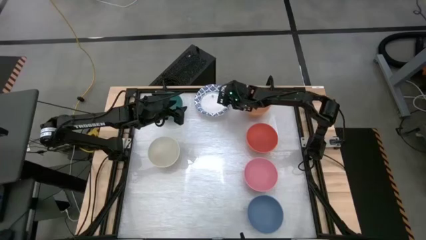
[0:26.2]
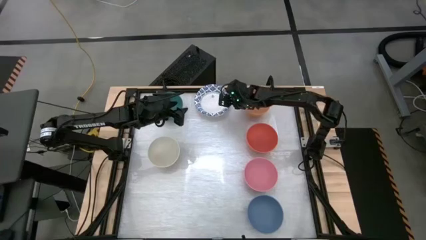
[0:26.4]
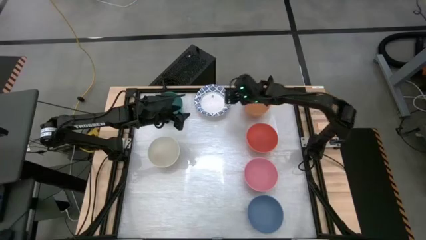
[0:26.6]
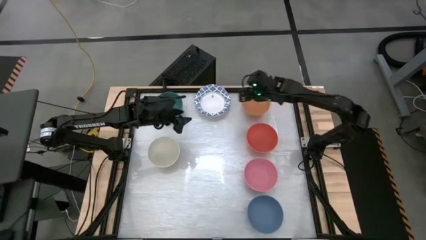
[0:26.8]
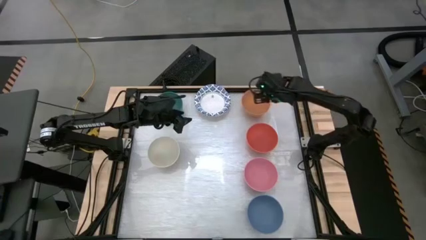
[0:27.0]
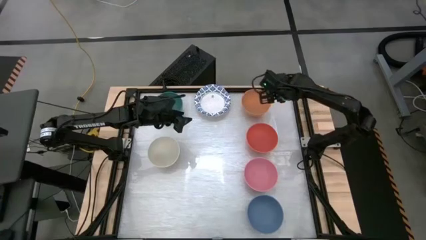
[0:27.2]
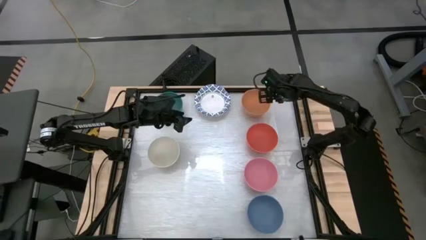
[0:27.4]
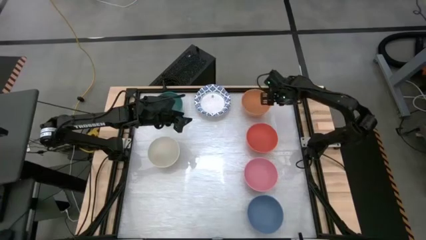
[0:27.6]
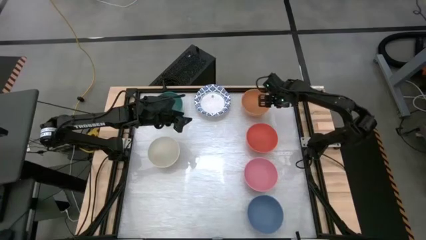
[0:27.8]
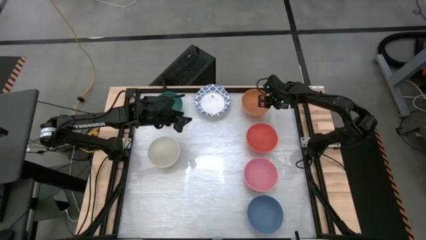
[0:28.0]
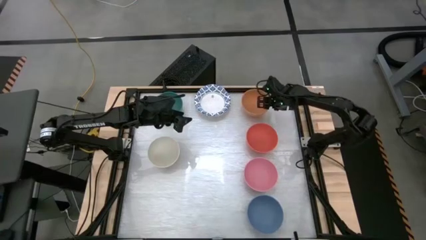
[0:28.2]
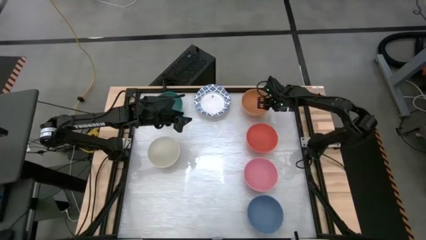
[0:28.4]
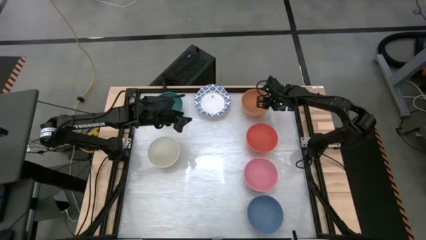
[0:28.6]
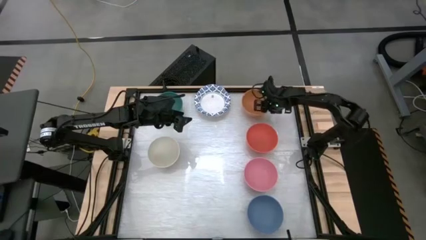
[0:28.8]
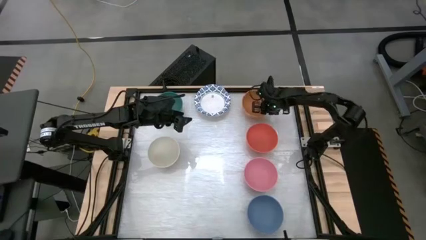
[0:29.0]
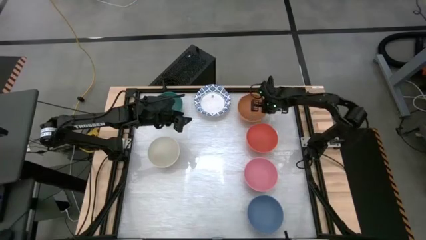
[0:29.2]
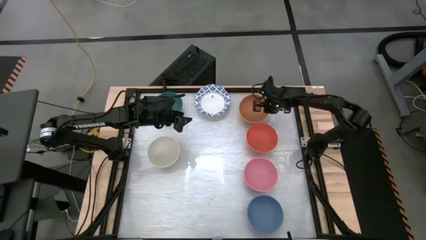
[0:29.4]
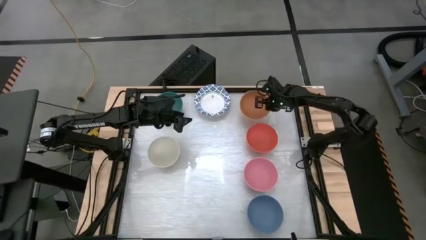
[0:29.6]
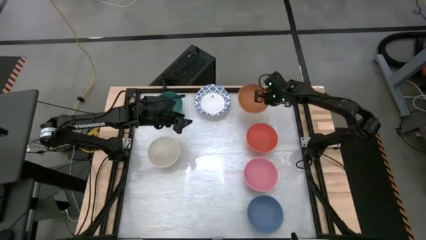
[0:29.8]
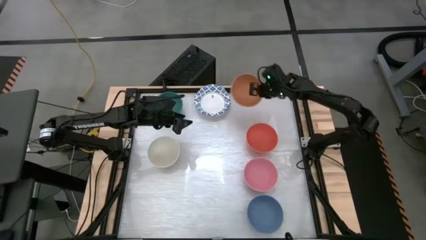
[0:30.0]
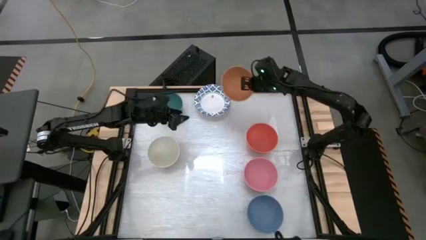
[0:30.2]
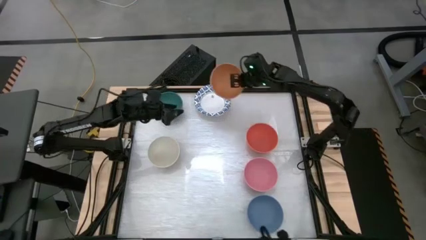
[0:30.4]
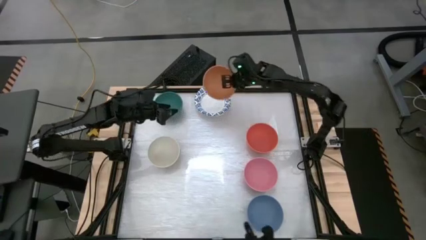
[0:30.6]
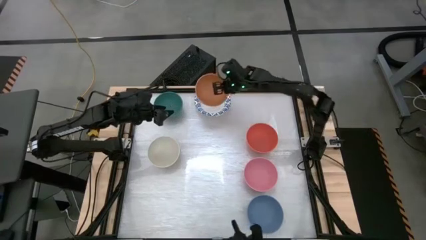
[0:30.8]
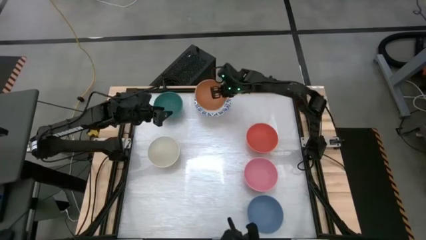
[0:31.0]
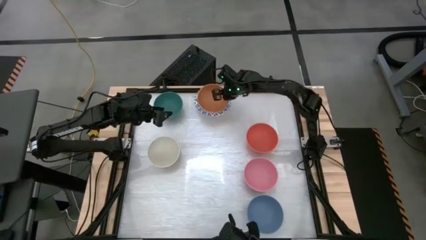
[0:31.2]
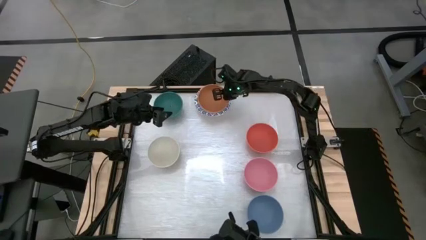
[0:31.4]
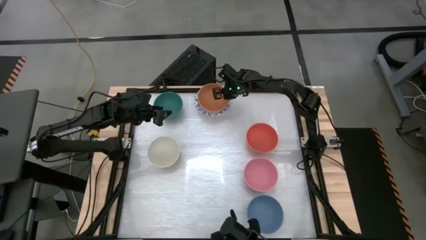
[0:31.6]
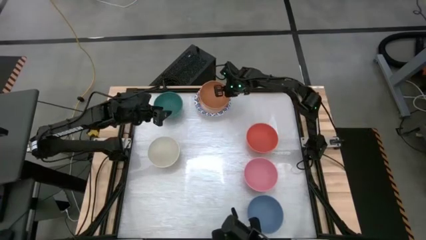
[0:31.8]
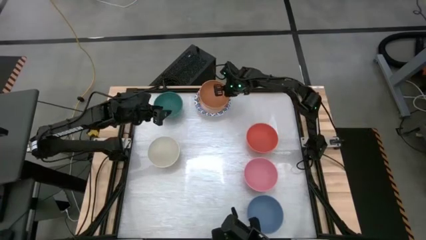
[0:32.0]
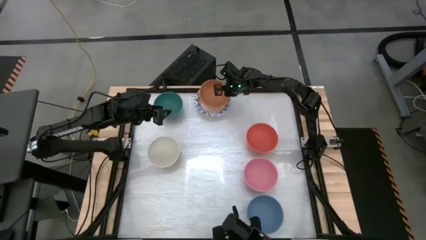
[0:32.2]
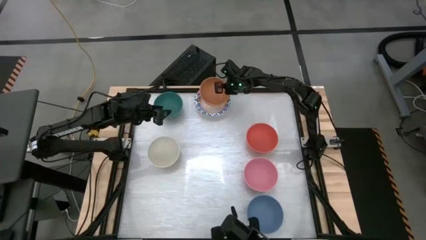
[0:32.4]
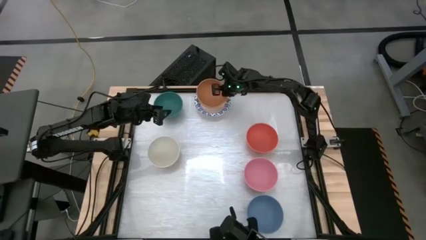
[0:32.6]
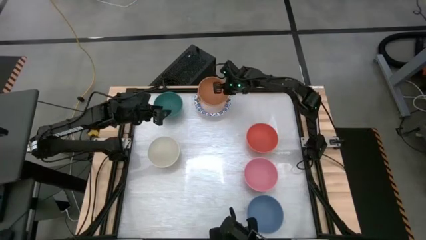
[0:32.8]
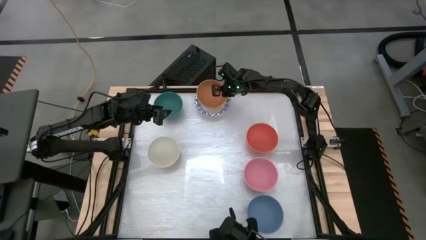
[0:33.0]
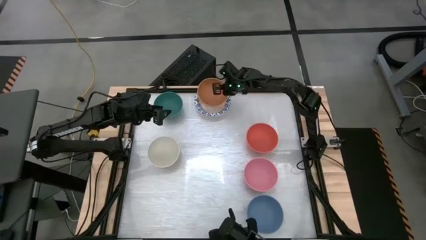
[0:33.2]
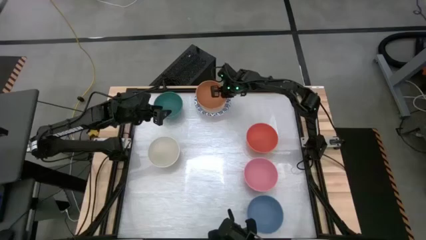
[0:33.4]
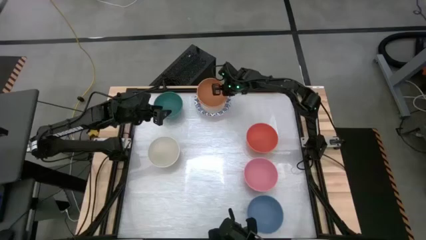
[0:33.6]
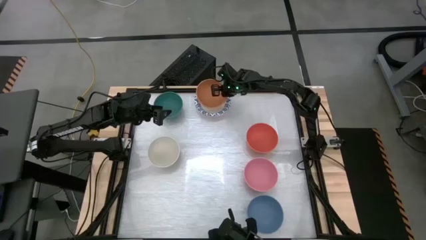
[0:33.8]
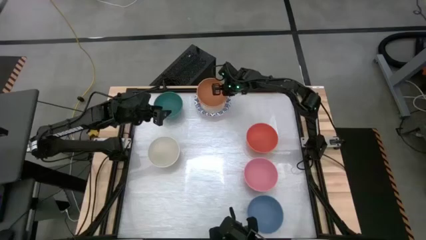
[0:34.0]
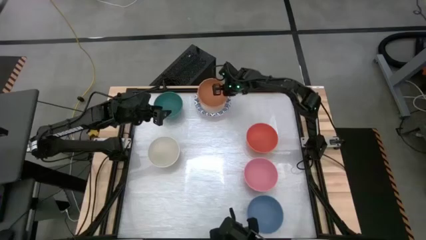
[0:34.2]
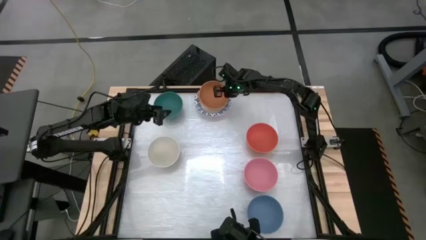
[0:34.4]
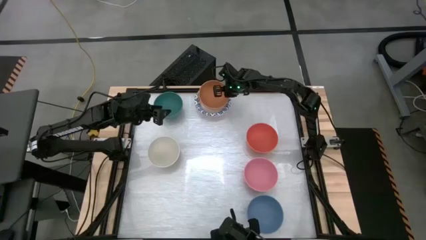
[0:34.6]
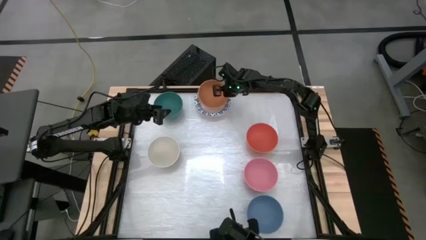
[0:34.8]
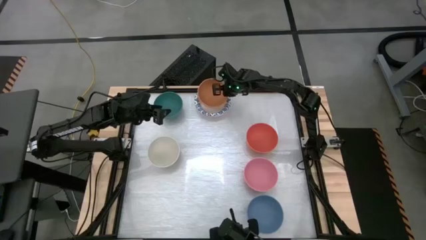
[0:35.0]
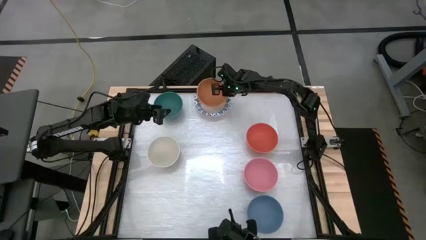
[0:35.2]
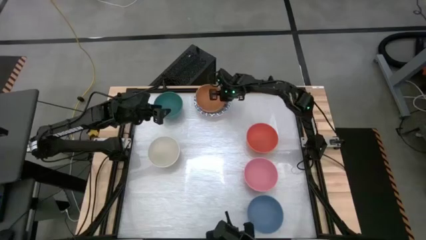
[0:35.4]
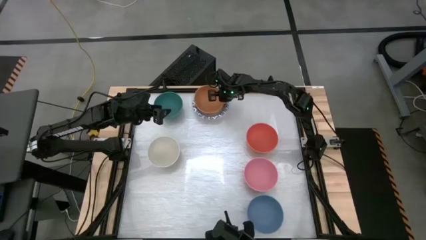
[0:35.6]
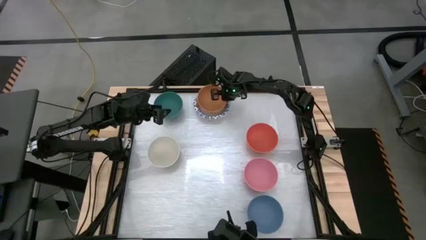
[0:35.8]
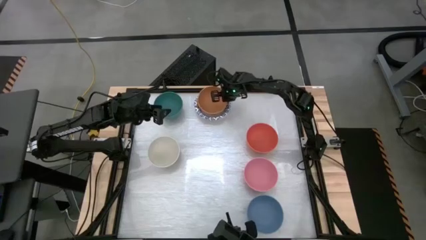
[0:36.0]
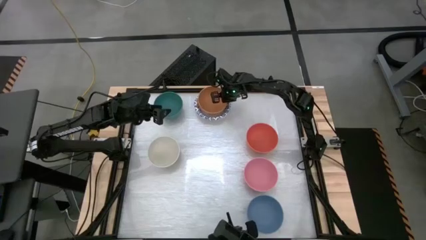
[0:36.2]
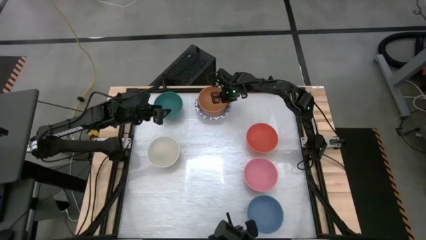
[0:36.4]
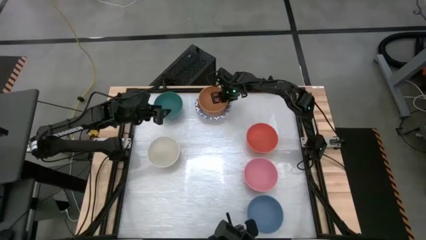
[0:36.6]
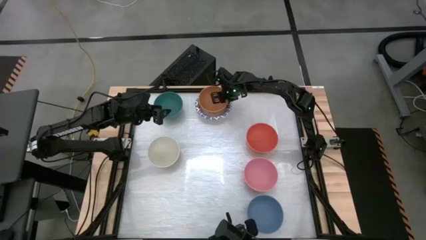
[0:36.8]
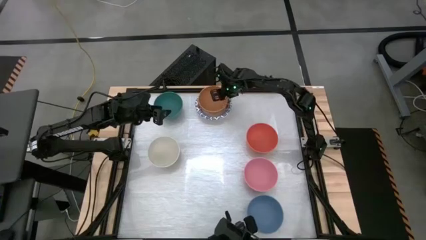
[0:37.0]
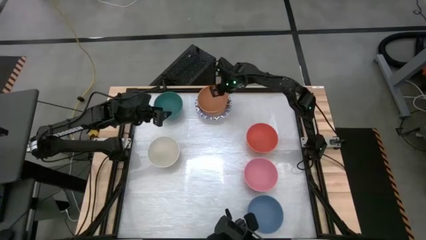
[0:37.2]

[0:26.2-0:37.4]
Task: Nest bowls inside each other by size order
Stack the brown bowl on top of the white and blue plate

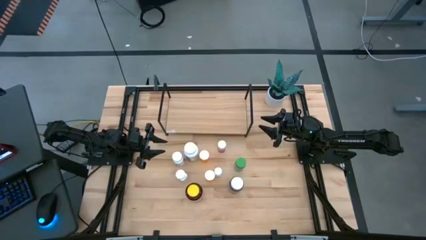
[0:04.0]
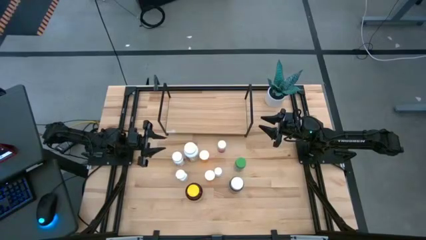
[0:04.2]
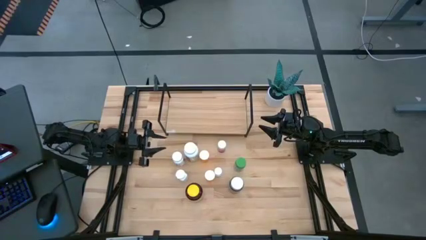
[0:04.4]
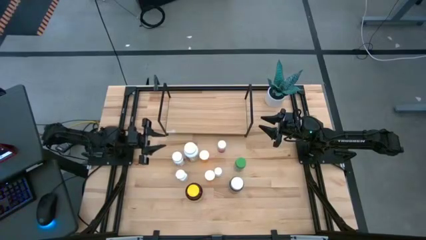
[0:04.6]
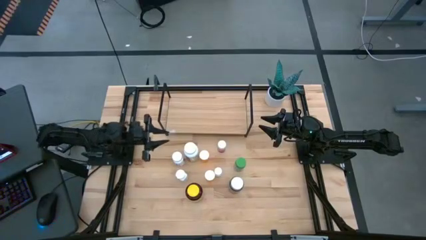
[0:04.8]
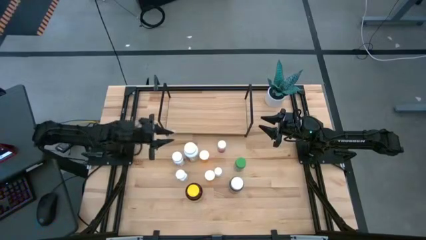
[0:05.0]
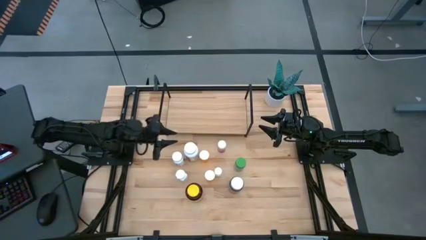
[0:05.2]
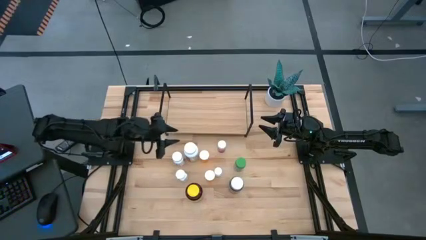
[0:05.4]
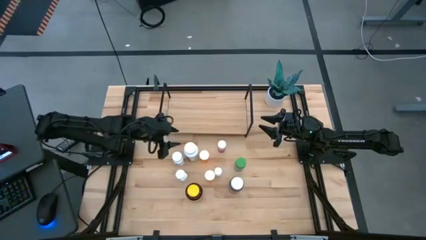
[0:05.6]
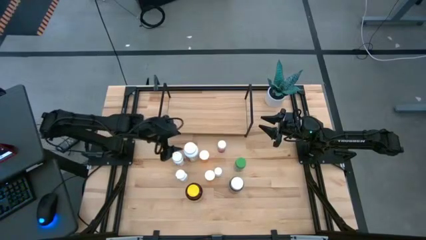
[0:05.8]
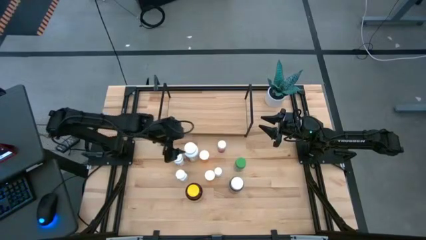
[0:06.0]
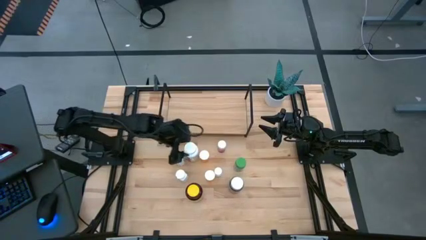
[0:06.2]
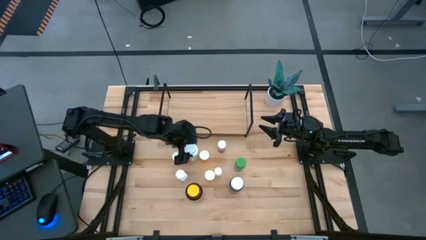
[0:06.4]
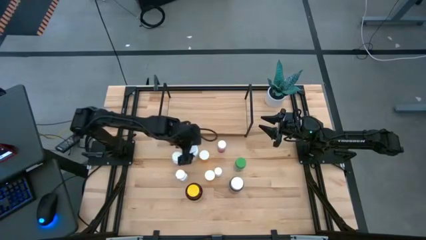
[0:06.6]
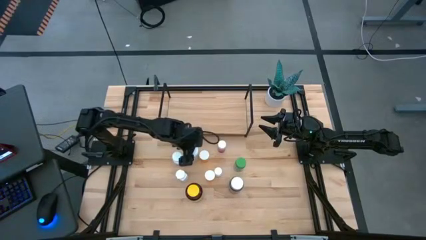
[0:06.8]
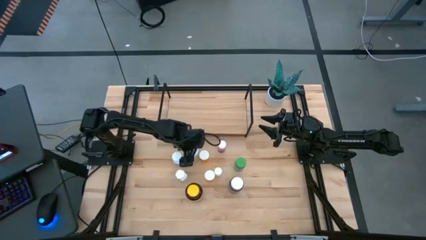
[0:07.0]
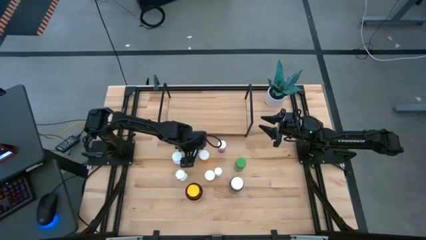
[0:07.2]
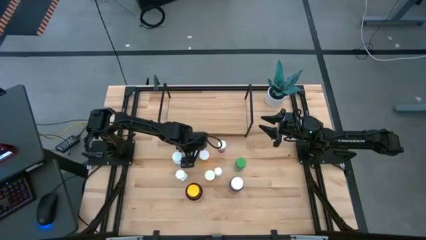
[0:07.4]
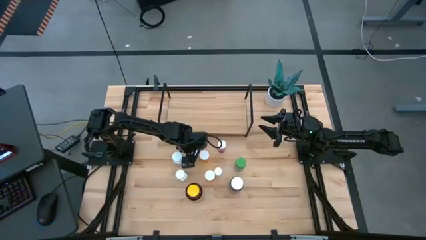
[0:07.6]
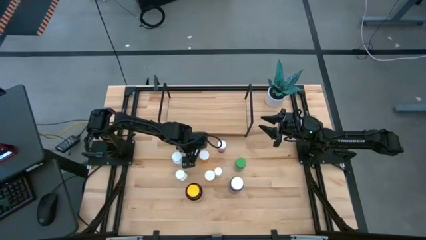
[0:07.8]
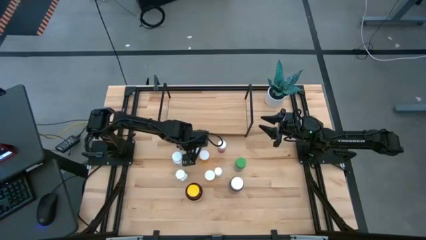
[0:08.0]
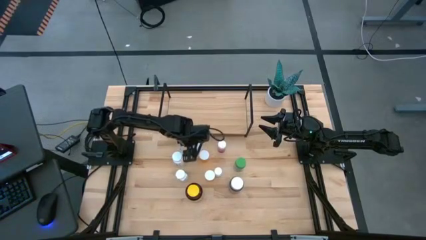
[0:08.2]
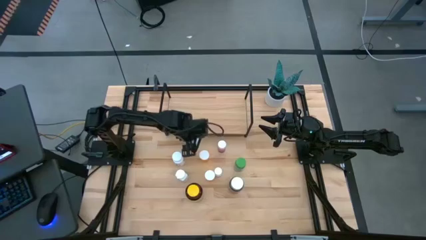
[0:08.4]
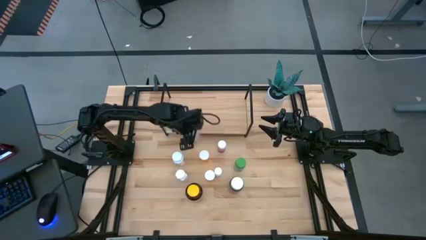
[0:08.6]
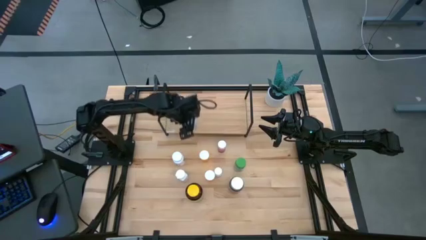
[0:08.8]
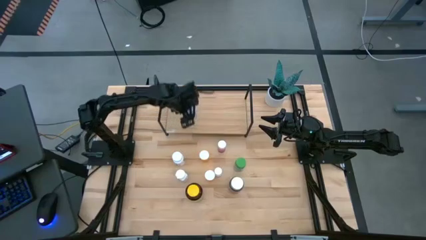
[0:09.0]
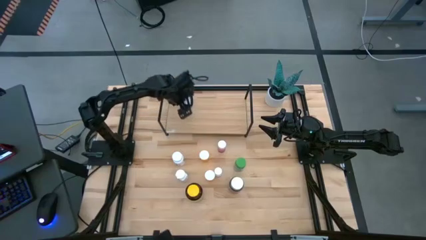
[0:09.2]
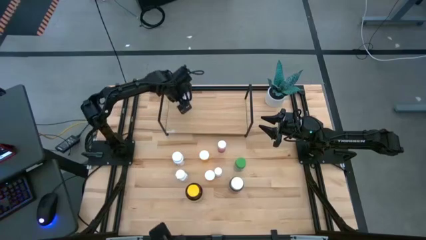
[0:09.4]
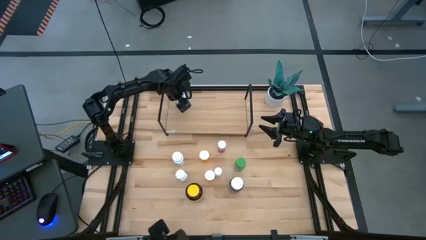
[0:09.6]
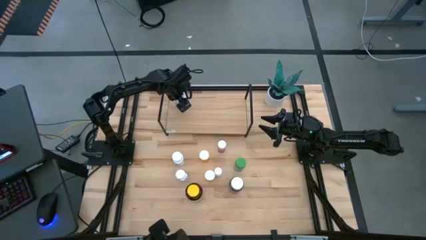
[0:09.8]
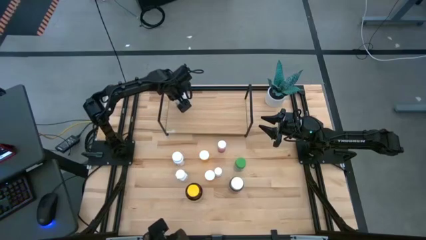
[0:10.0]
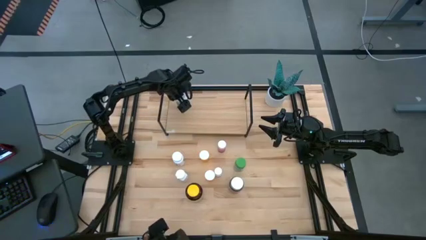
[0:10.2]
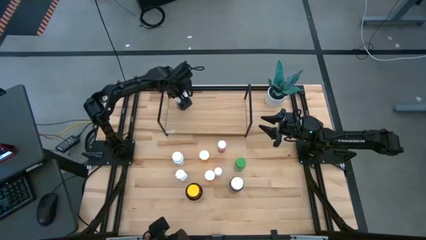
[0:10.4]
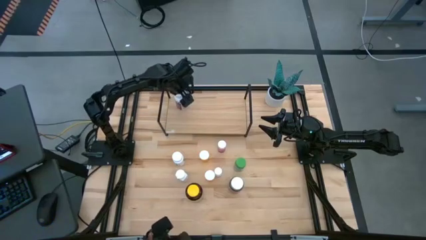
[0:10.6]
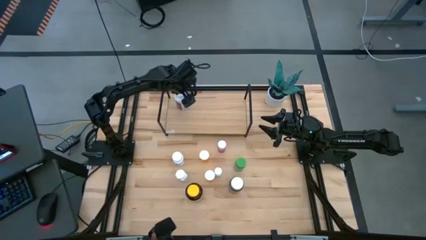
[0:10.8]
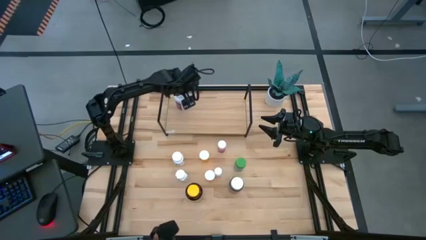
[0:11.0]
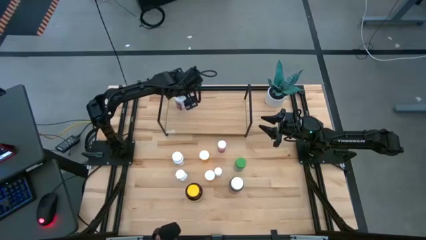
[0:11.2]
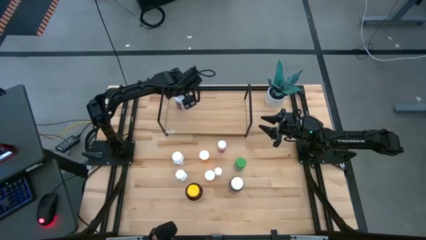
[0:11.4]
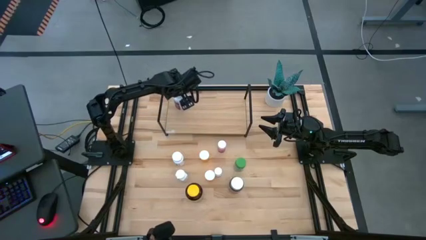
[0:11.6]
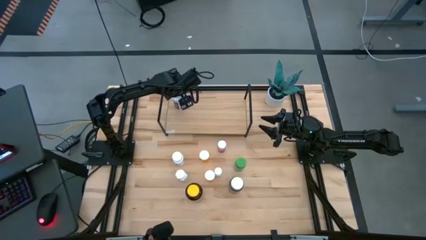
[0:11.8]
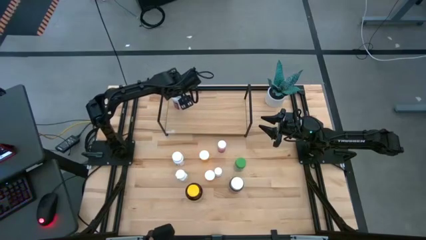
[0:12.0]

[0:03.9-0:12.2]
Task: Pick and place medicine bottles onto shelf by color
Put the white red pill bottle on the shelf
